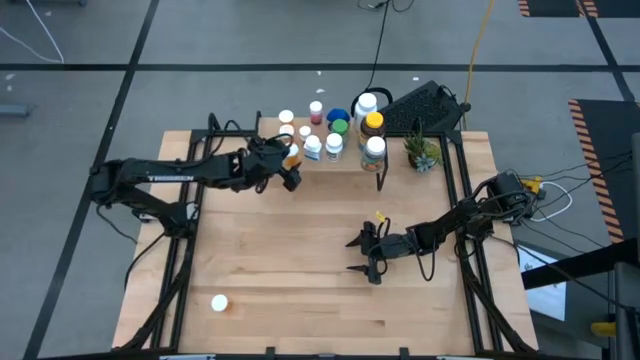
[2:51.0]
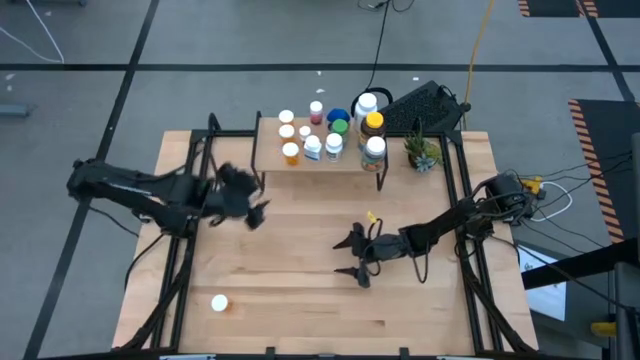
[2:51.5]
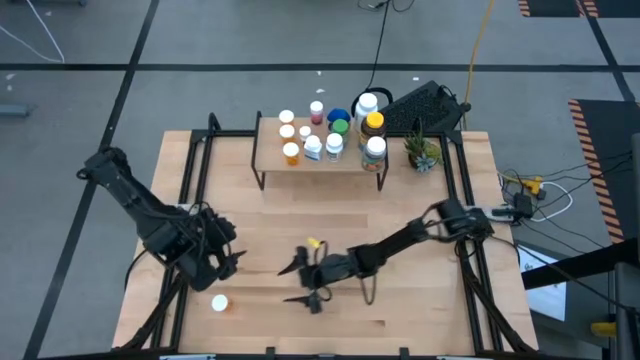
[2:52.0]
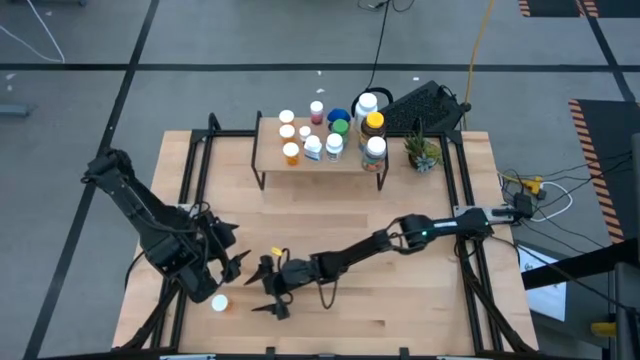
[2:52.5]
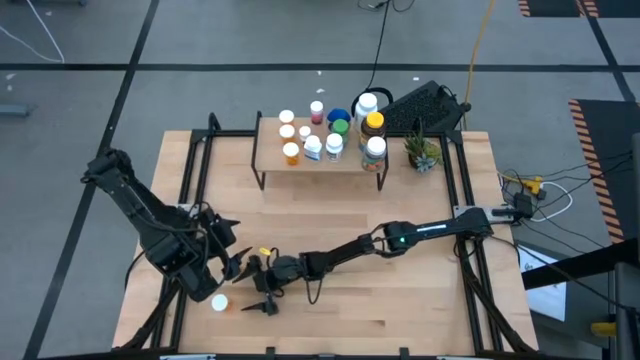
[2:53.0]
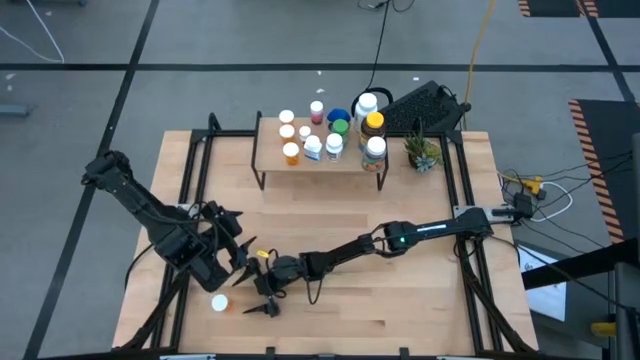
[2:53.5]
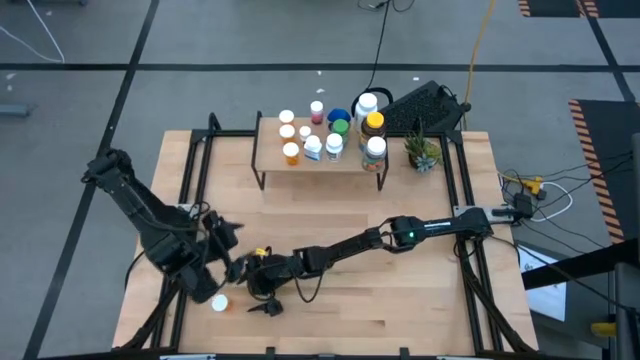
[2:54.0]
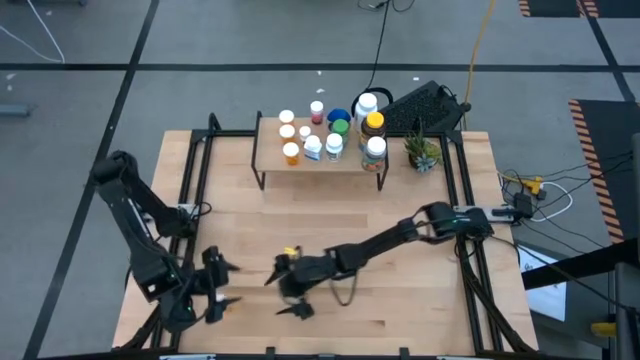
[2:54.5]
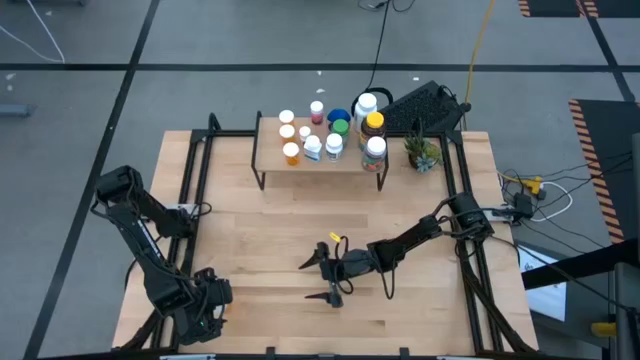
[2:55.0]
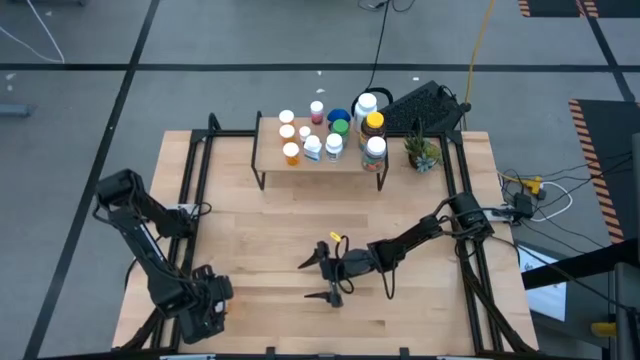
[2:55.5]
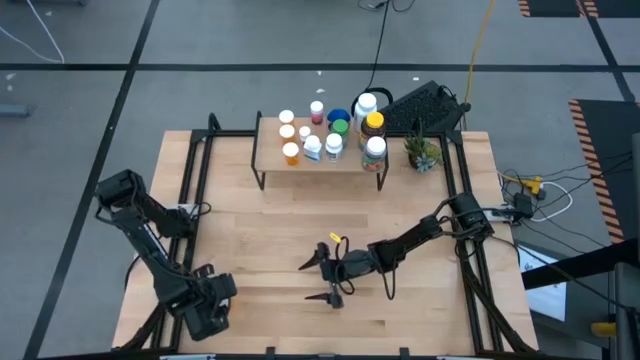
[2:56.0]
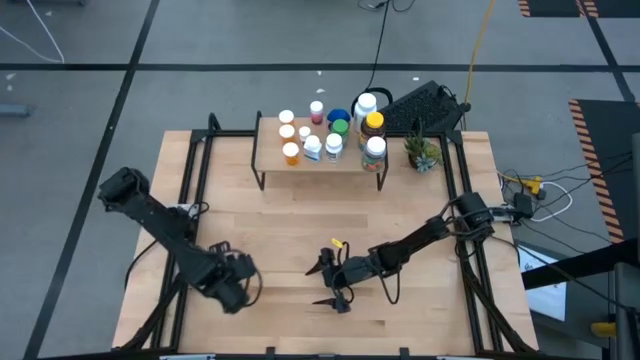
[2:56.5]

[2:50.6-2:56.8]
Task: Pick and place medicine bottles onto shelf by color
Put the orange pill bottle on the shelf

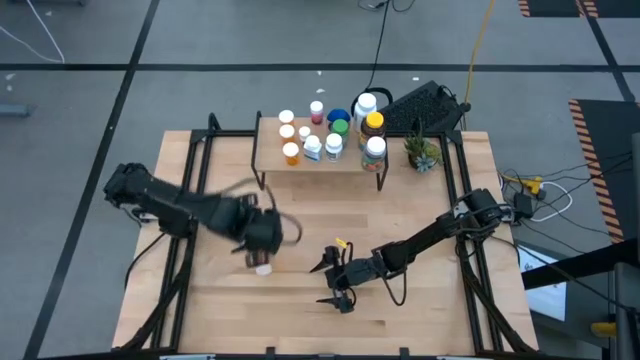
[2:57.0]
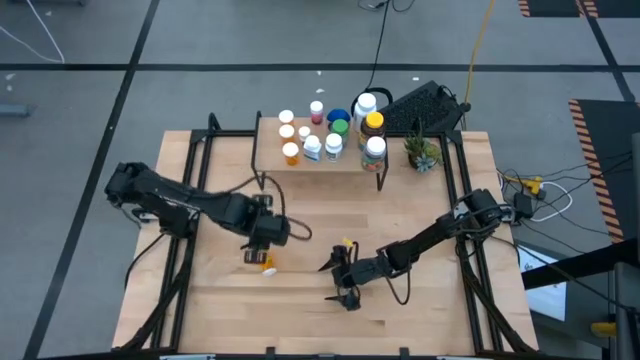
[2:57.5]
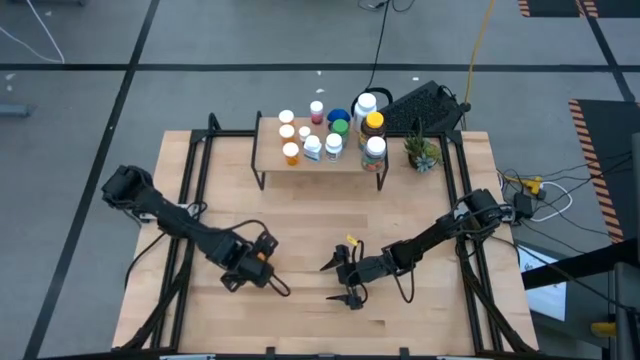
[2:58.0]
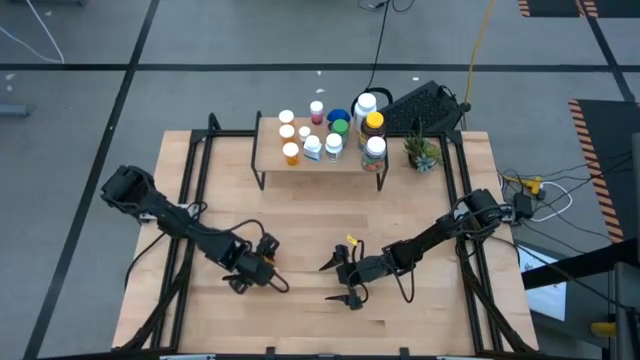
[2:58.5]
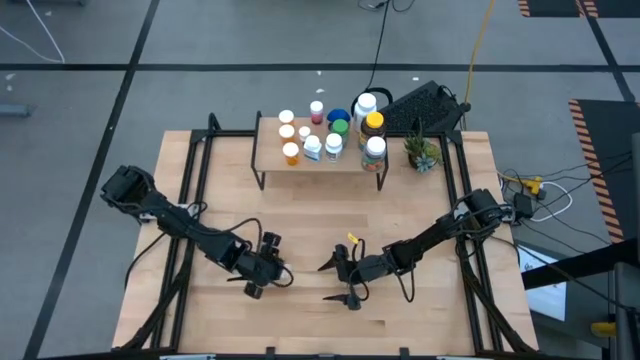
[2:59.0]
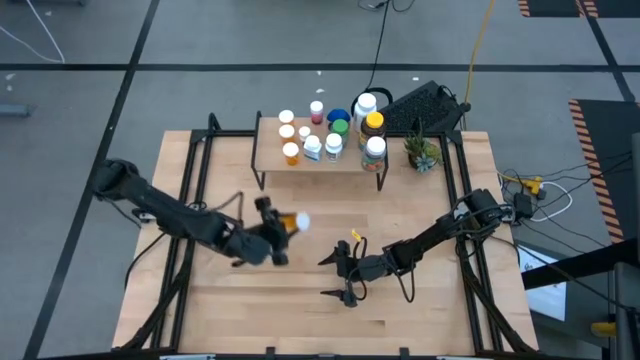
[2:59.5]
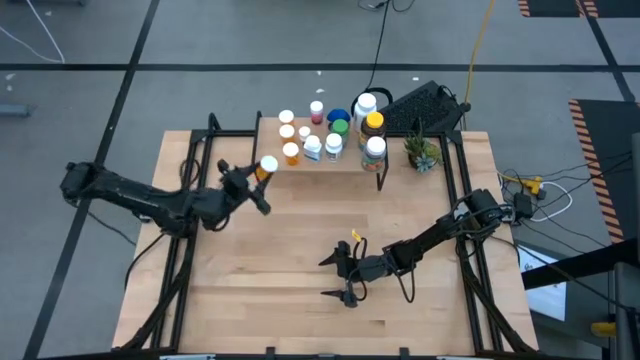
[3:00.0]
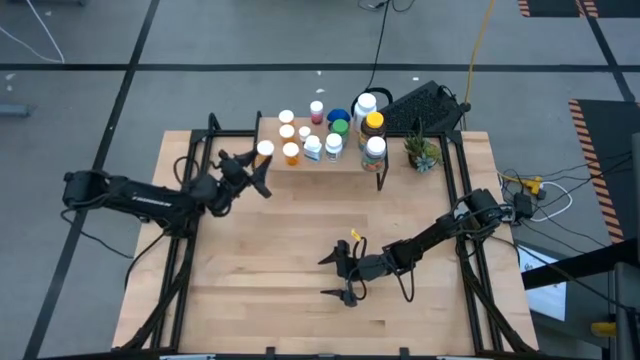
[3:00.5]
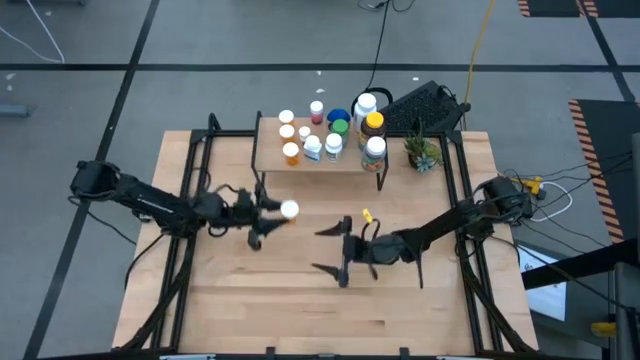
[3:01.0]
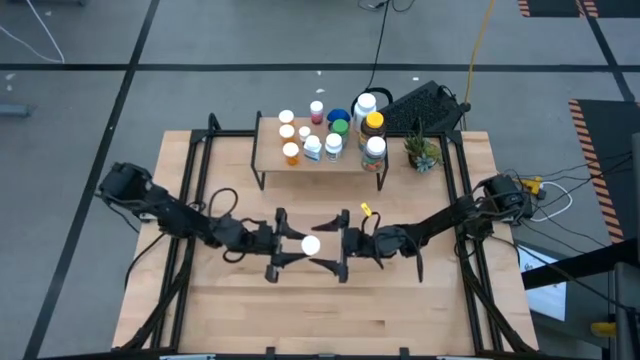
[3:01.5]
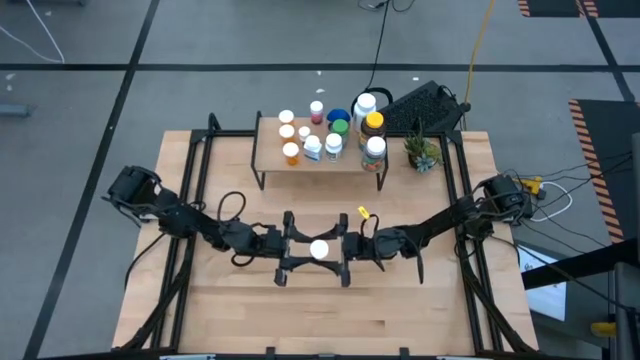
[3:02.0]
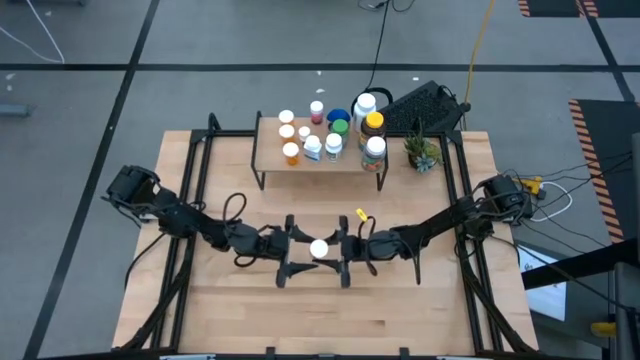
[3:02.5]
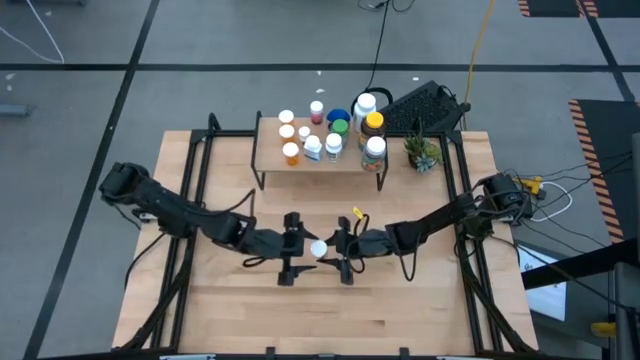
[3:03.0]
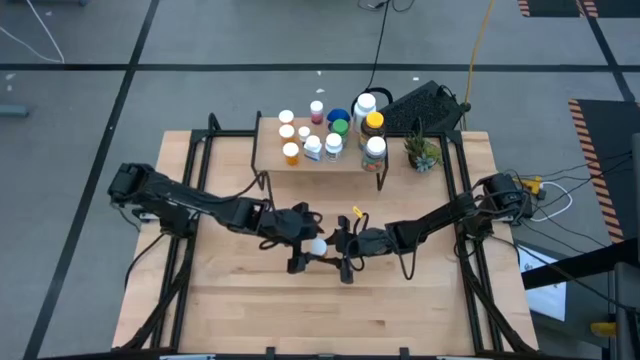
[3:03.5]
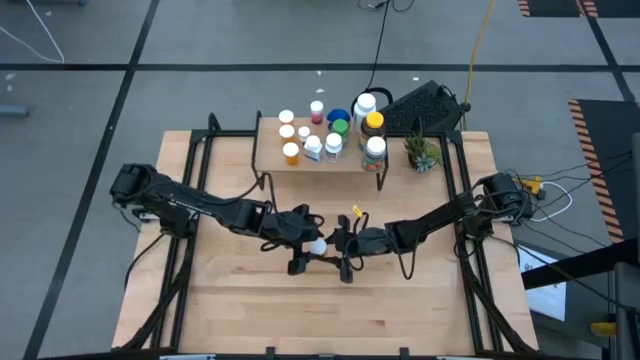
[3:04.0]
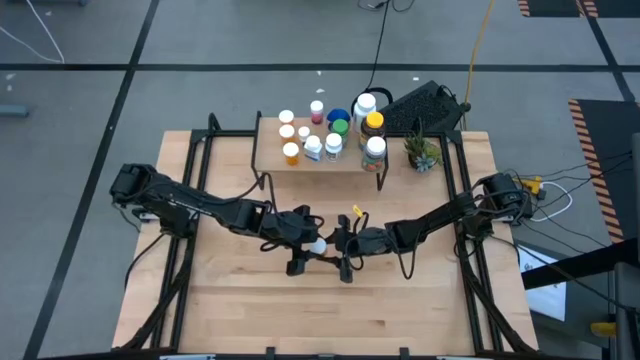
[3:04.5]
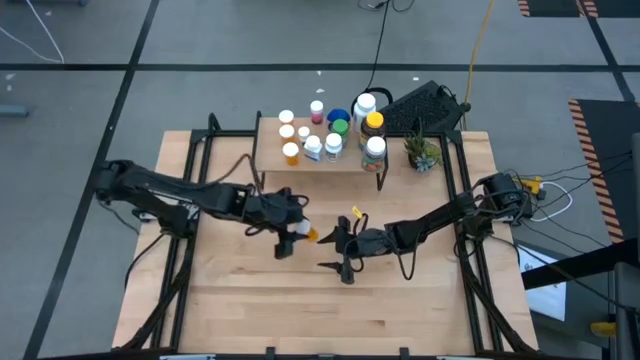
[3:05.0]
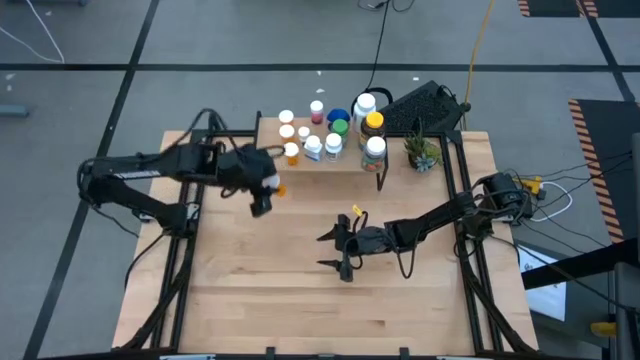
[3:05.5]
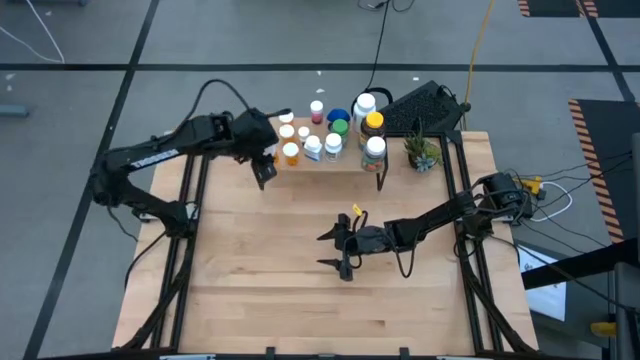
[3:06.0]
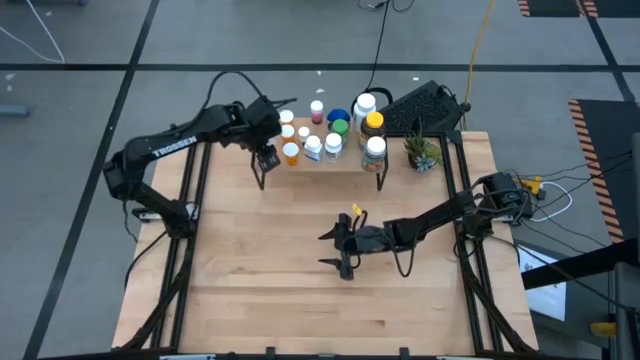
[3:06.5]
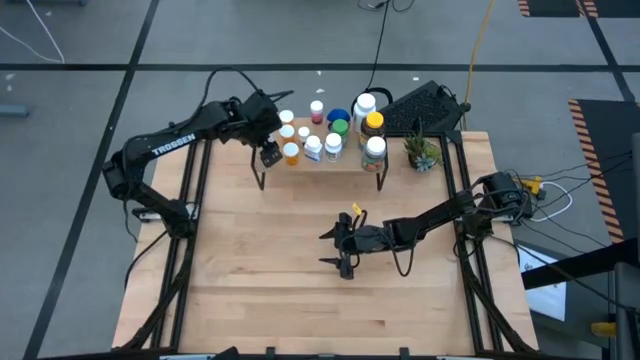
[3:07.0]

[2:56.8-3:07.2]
Put the orange pill bottle on the shelf

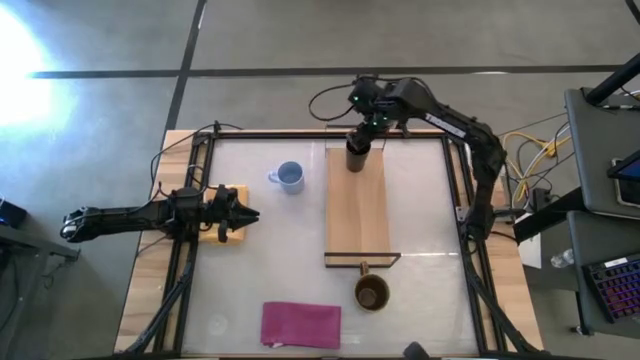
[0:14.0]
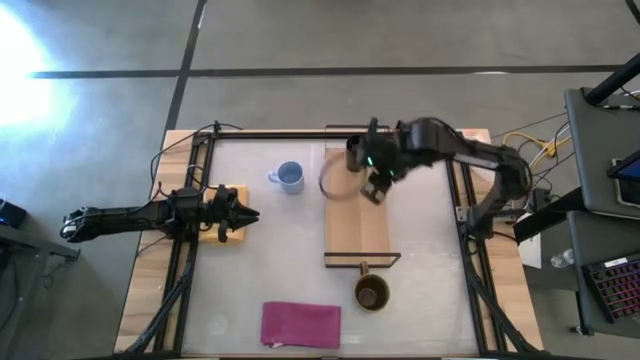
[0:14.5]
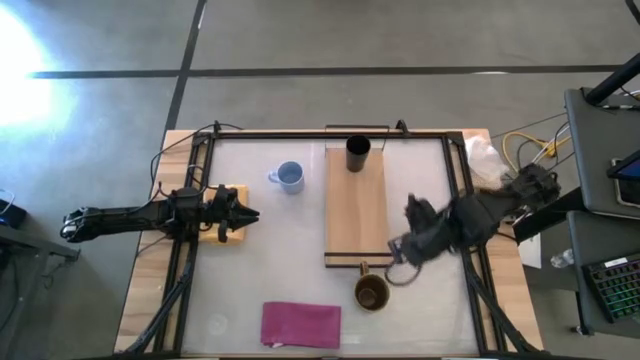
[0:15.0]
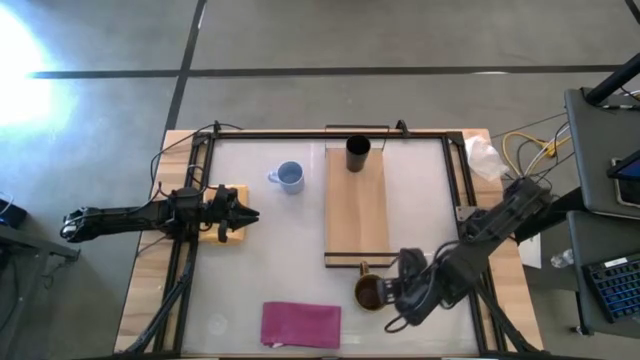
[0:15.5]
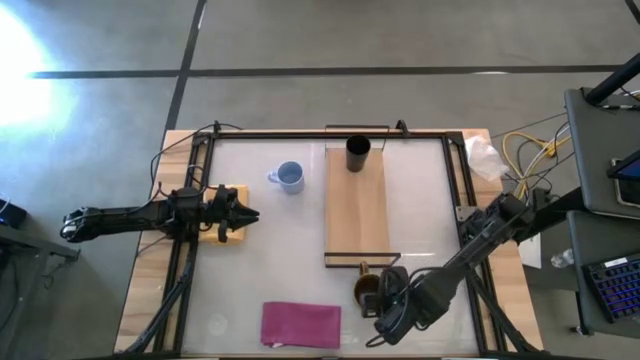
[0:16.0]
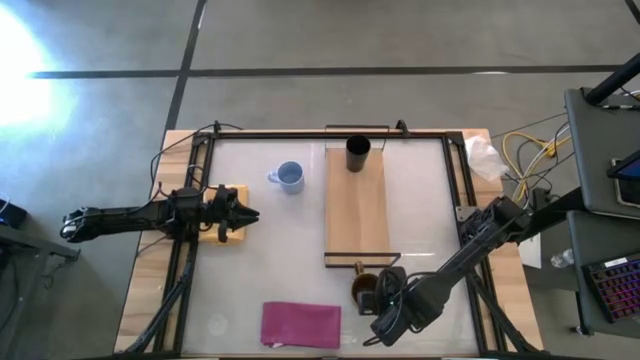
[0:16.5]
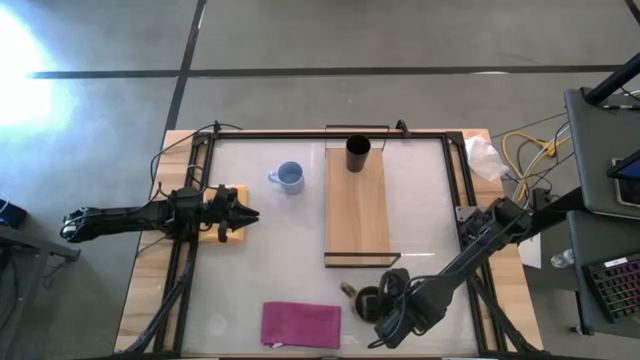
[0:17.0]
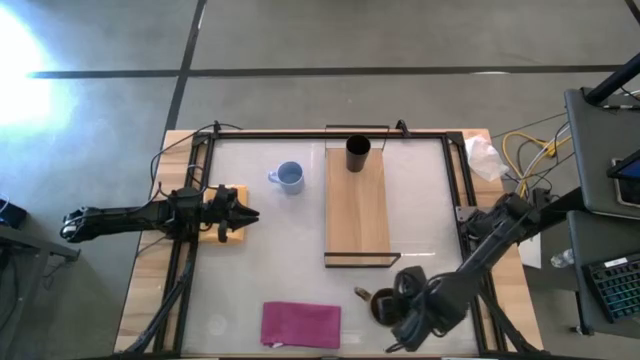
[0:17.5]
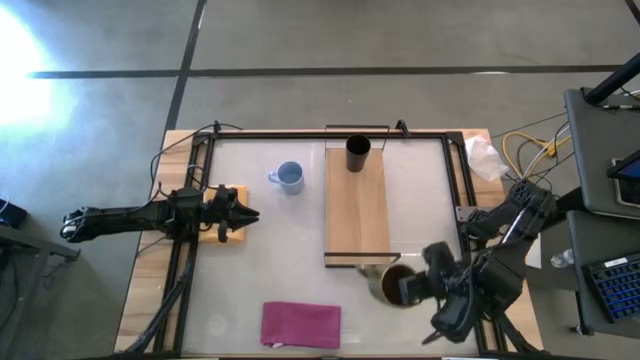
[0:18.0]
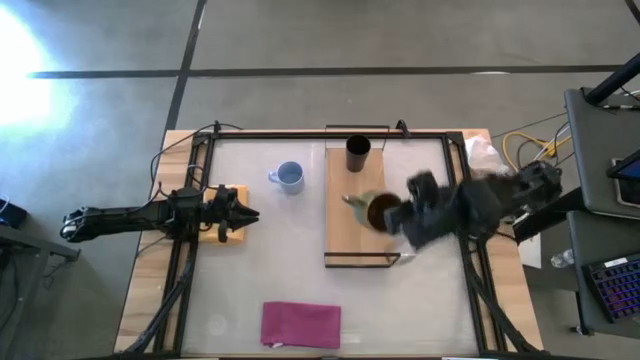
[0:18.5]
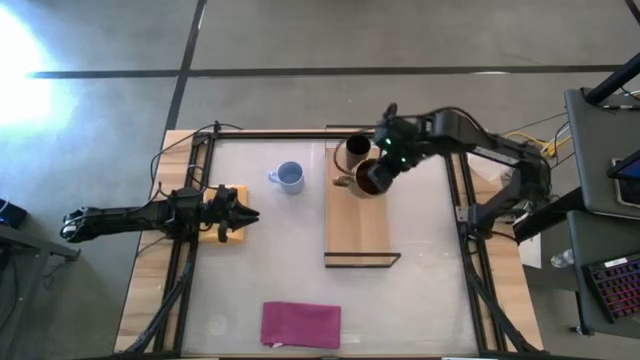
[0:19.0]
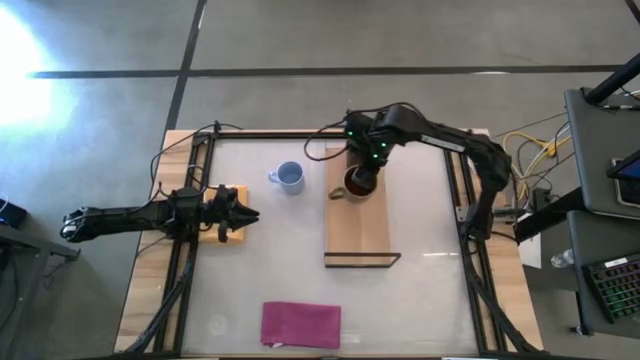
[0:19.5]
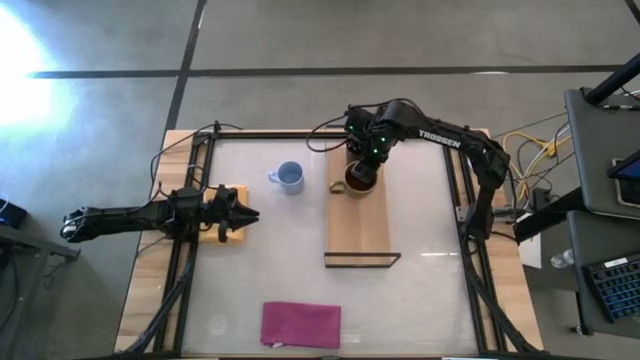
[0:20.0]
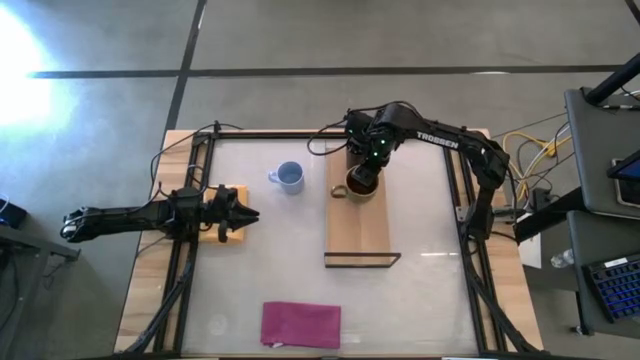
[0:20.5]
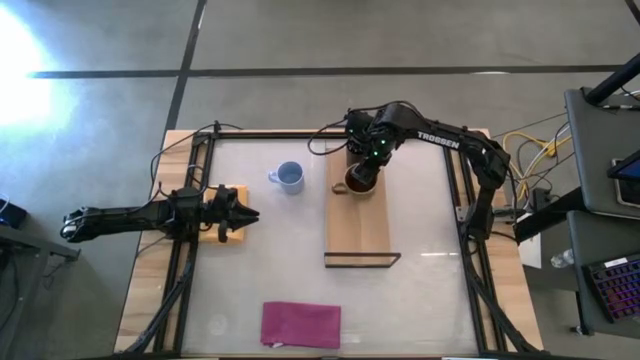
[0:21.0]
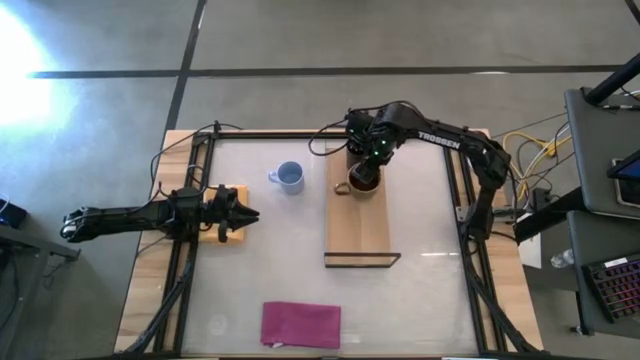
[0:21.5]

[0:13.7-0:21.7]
Task: Stack small to large cups/mugs on shelf
Put the brown patterned mug on the shelf
